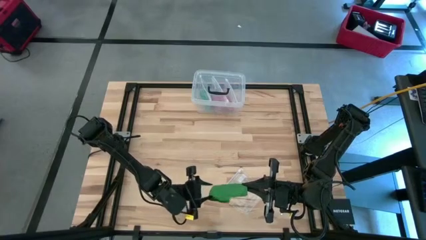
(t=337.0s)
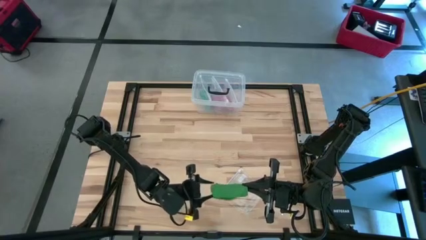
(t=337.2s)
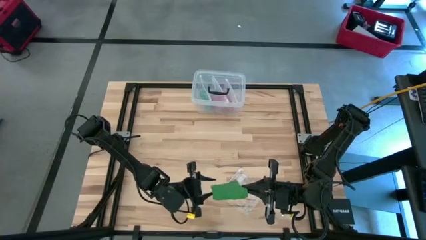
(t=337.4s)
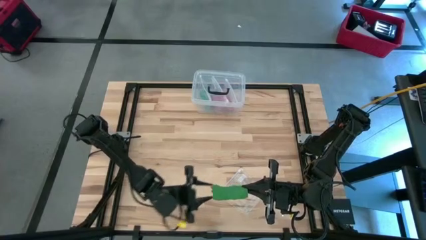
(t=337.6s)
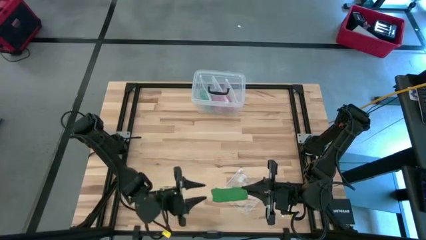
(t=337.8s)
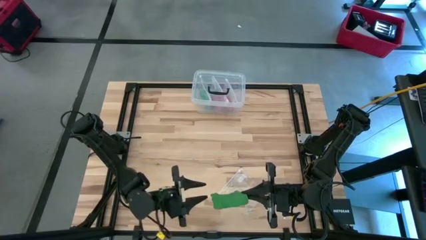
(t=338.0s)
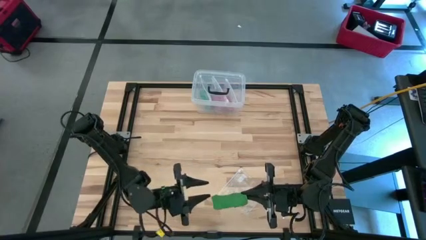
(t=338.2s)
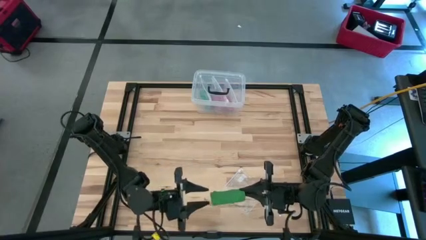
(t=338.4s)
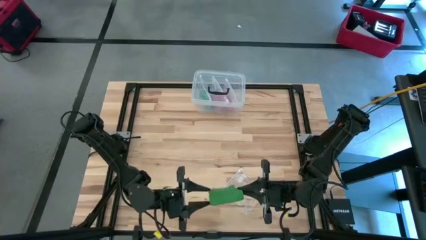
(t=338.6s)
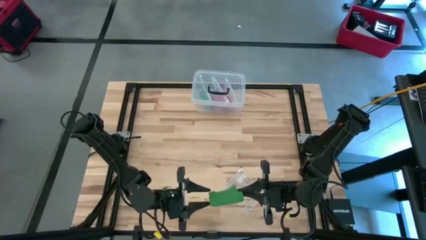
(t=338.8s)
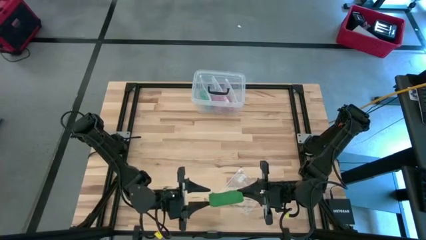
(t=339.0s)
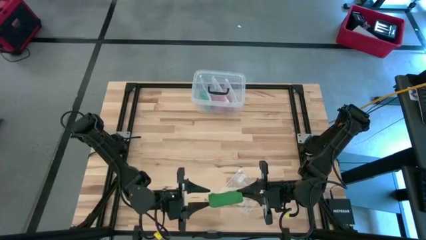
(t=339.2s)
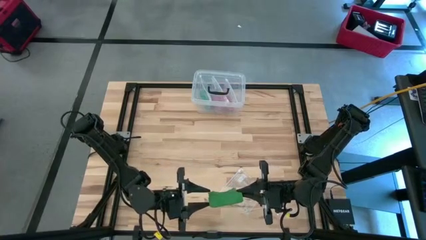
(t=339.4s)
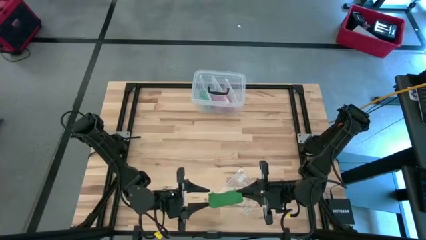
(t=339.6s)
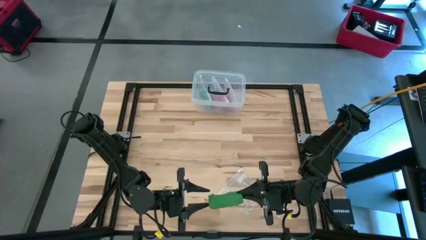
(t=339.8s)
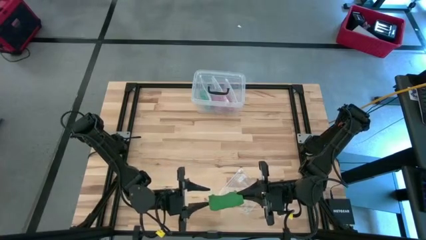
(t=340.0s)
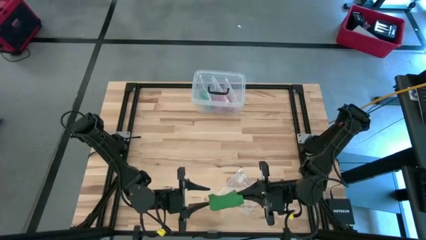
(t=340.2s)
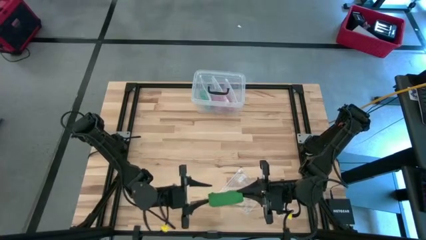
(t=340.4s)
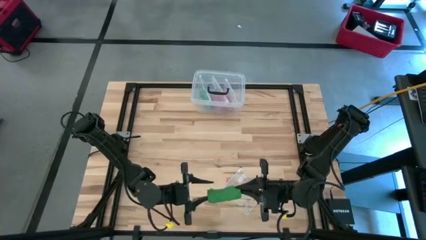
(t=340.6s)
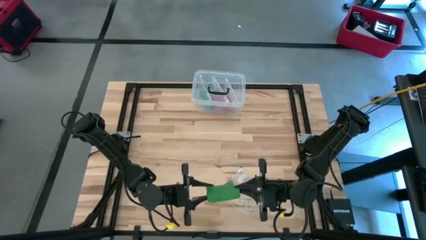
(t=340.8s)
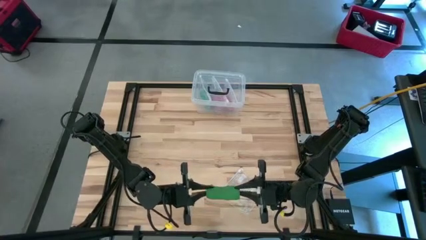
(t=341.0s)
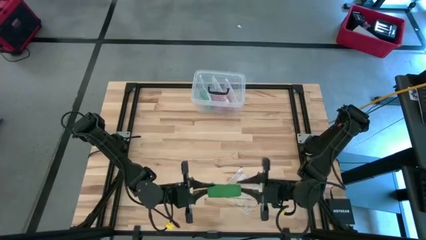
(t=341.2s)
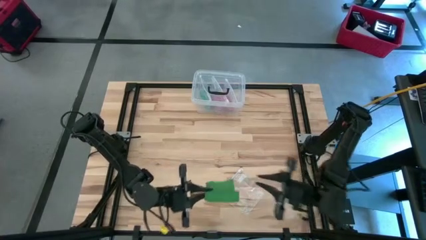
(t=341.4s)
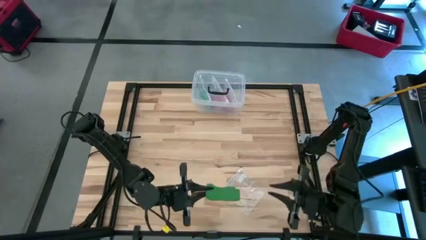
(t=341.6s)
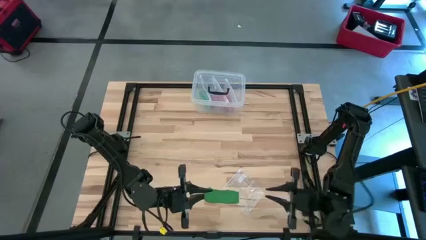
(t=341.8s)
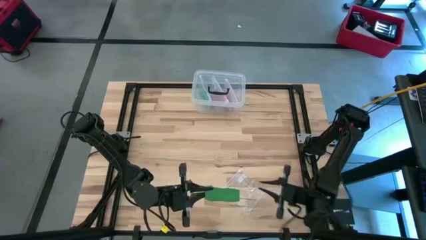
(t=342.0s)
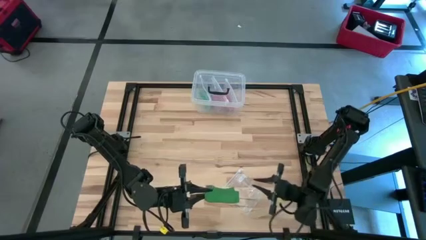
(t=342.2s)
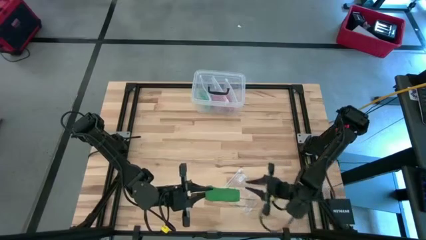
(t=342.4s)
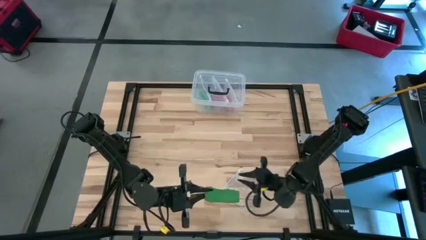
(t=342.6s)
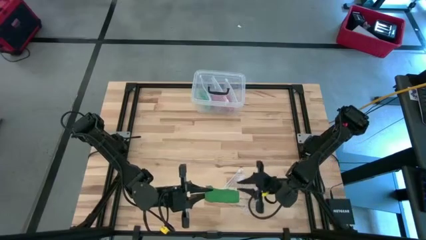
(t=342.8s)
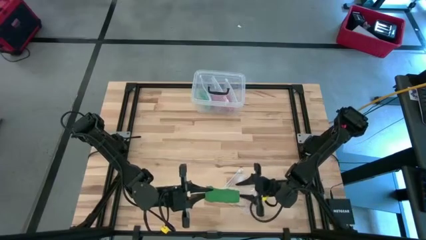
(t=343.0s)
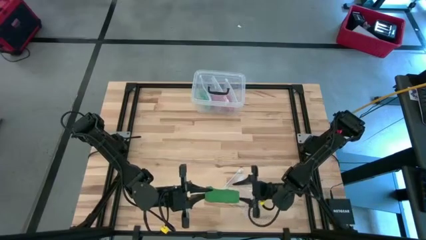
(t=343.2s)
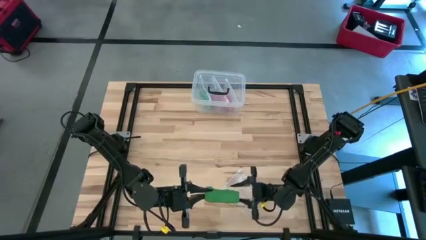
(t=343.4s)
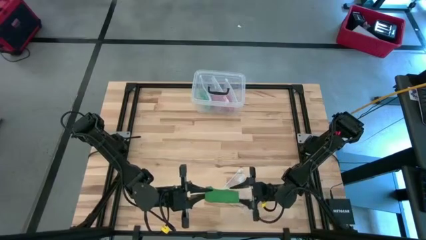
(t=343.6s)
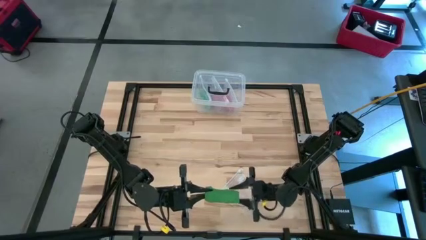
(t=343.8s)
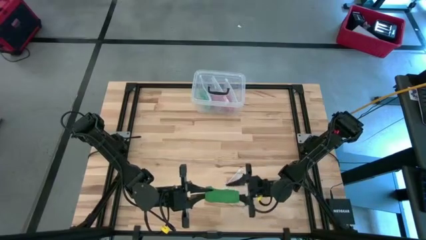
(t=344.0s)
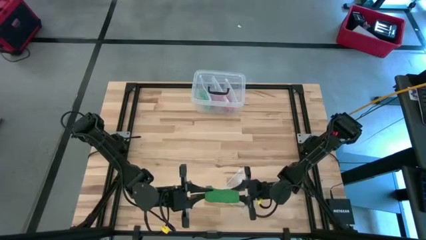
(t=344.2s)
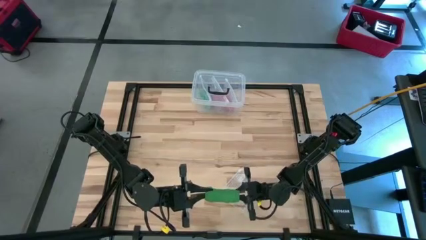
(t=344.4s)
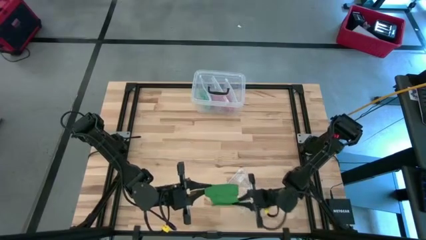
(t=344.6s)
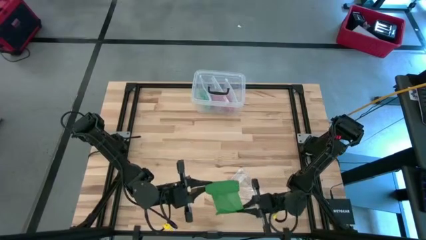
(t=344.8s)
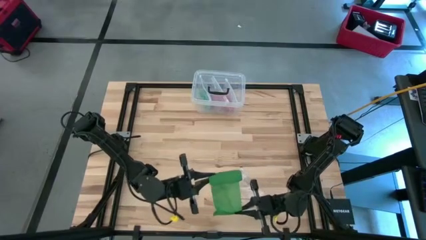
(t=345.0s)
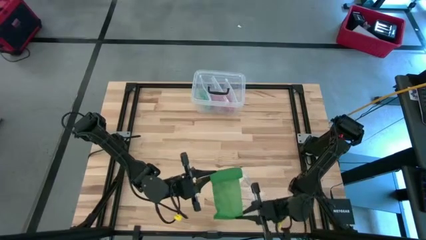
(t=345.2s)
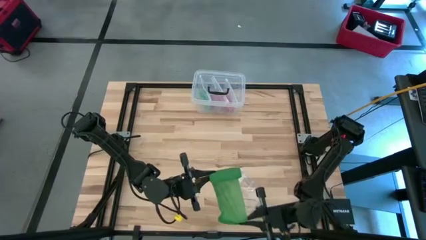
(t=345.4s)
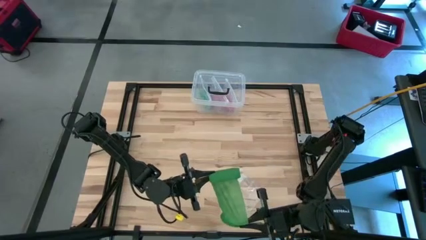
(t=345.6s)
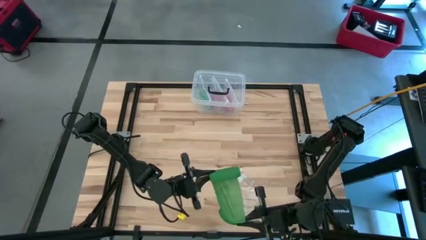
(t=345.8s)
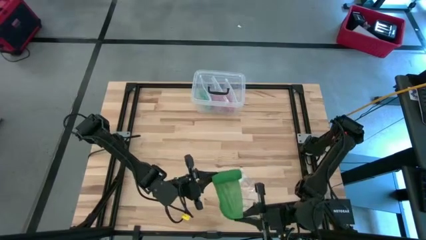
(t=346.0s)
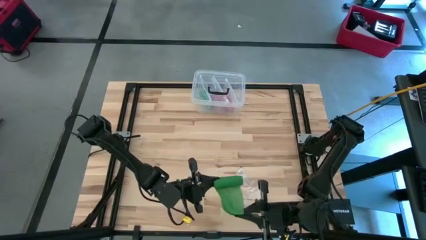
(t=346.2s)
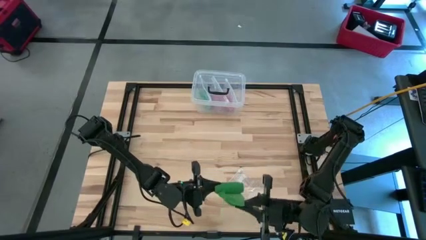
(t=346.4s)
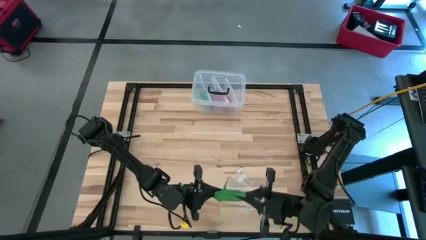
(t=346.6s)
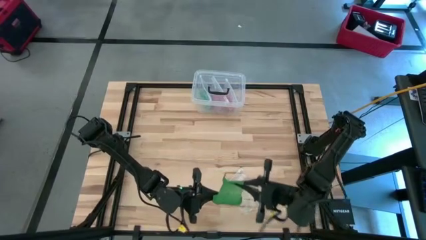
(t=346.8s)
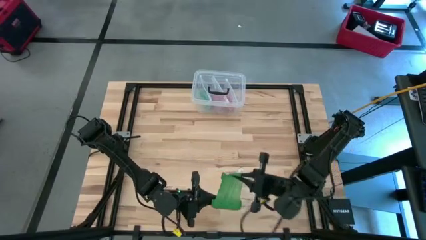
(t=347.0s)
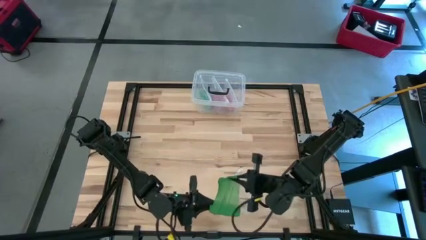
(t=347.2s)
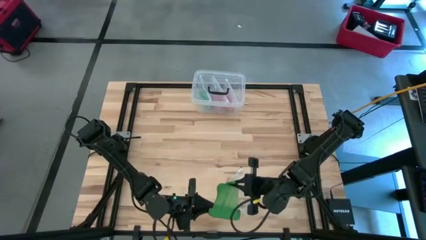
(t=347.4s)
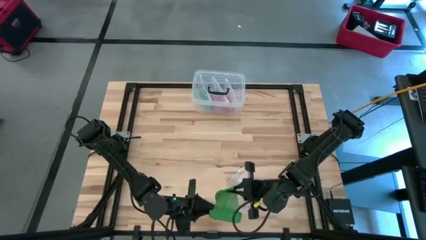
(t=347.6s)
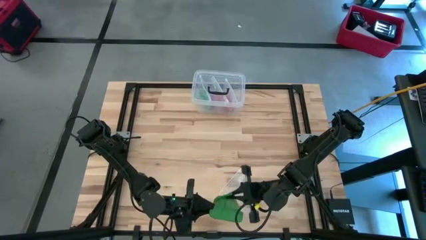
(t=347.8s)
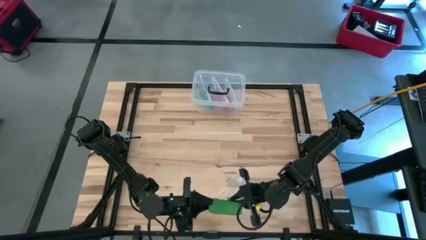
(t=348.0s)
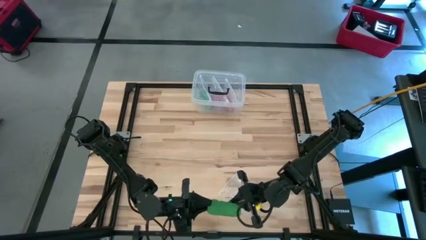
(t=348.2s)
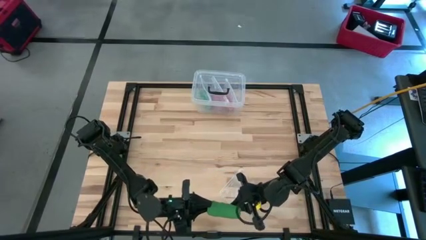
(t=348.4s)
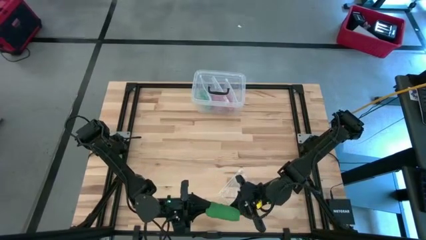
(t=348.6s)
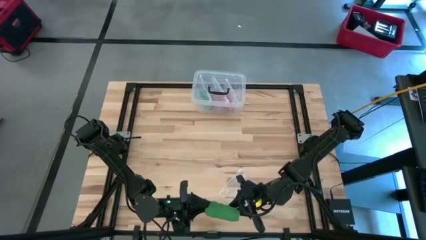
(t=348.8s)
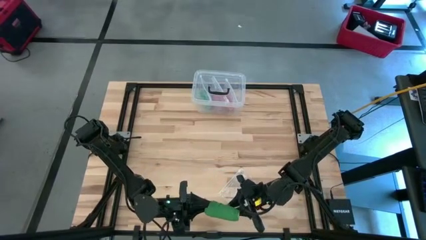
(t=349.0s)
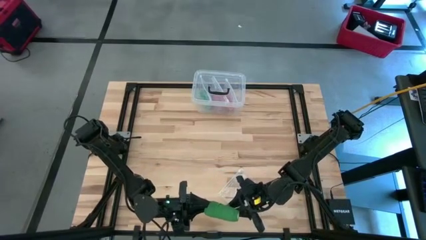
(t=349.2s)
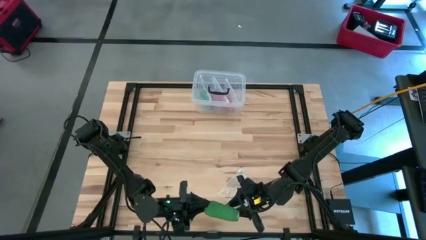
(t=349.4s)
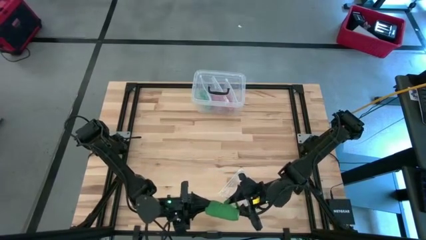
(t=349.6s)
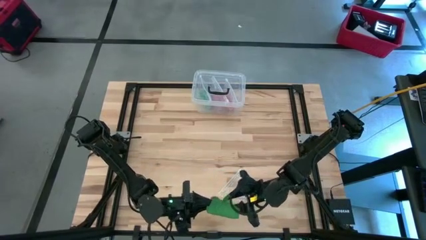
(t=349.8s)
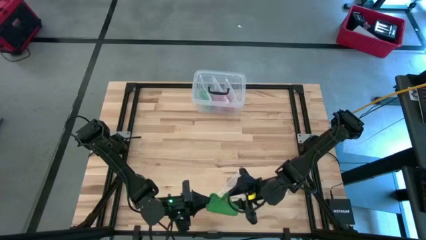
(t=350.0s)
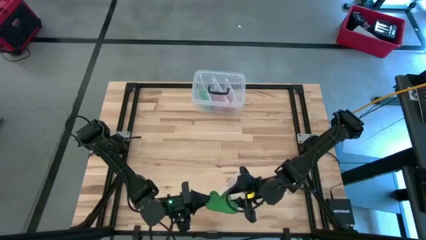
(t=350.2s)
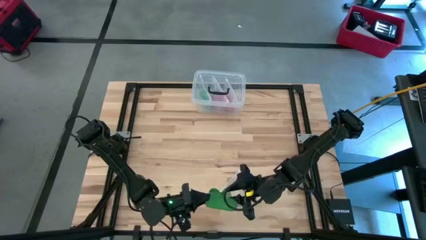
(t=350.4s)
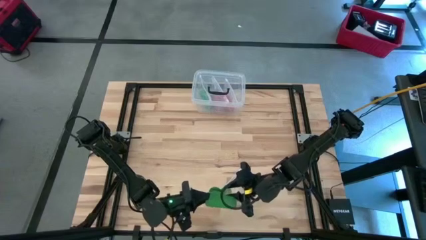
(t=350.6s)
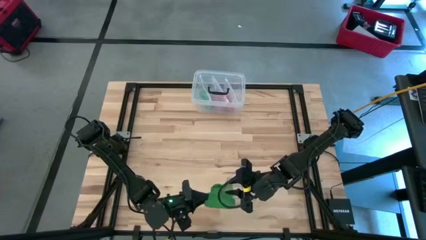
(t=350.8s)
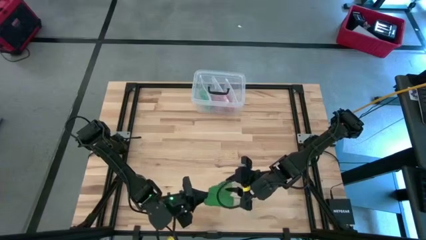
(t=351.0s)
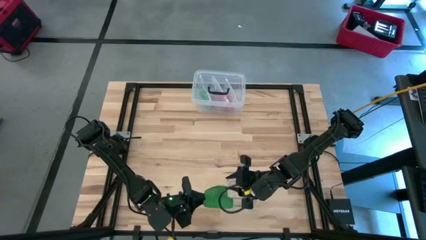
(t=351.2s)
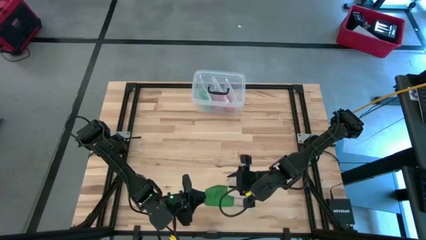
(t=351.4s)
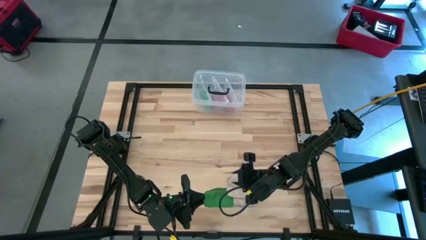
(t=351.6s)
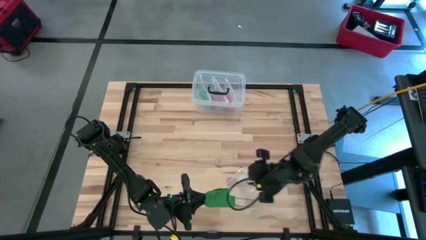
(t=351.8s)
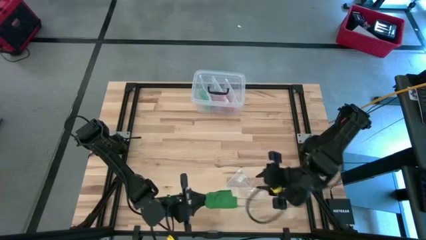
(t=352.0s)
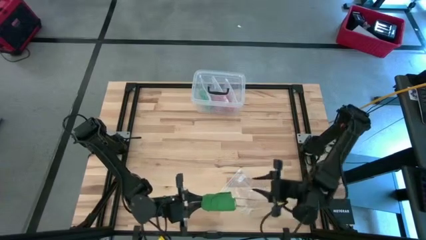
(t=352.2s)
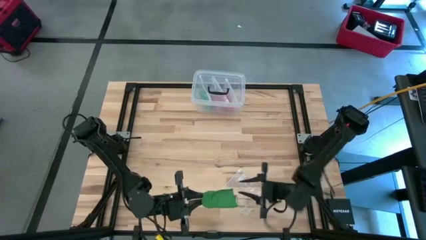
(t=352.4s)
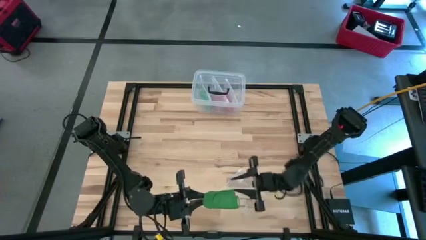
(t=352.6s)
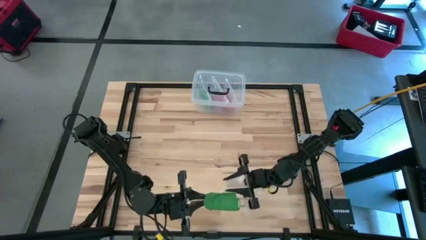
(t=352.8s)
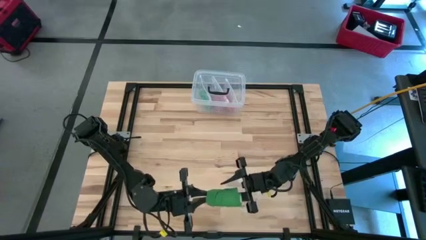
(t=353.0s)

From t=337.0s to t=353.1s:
Task: Roll bandage
Roll the green bandage
